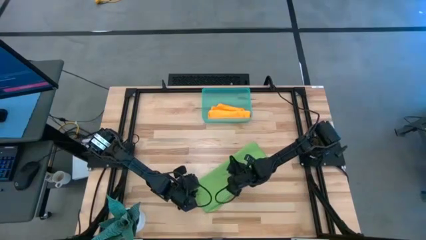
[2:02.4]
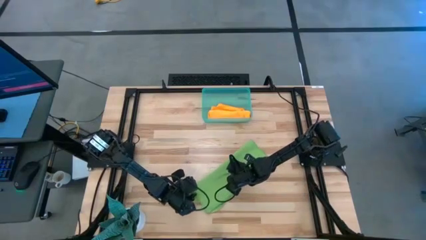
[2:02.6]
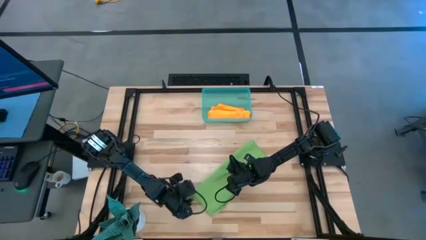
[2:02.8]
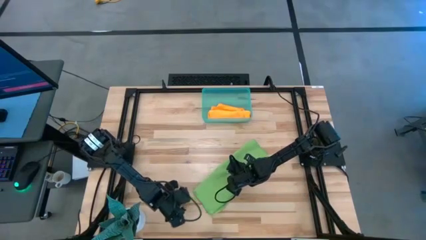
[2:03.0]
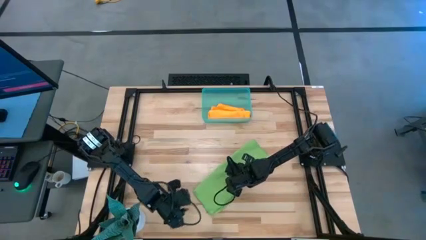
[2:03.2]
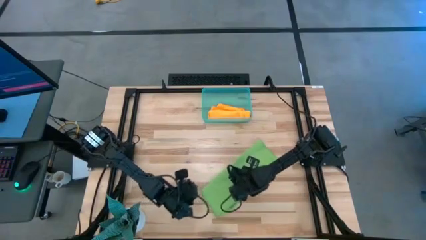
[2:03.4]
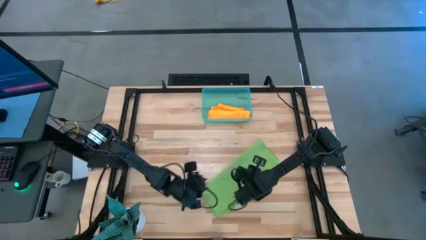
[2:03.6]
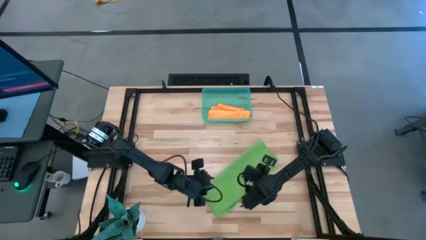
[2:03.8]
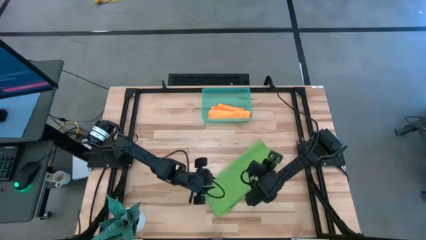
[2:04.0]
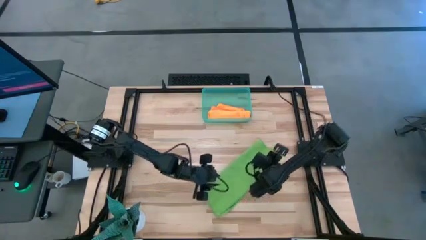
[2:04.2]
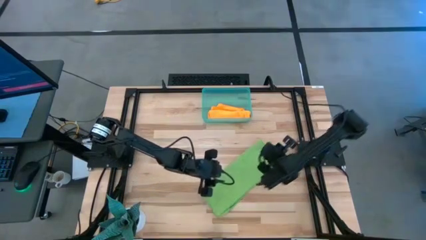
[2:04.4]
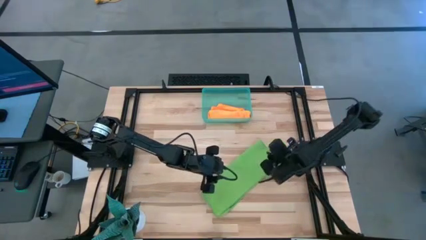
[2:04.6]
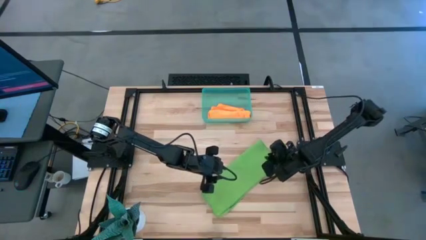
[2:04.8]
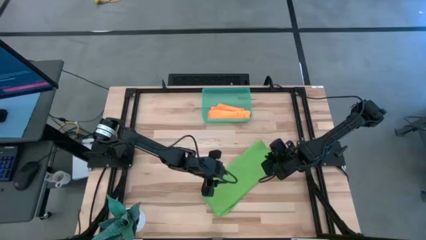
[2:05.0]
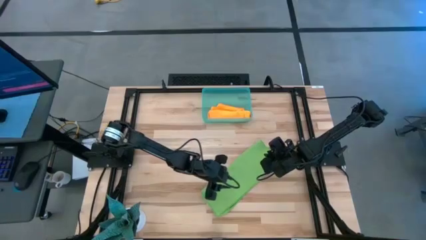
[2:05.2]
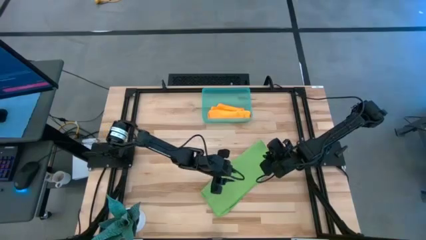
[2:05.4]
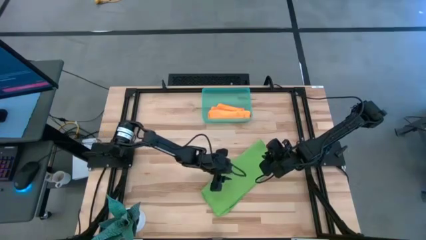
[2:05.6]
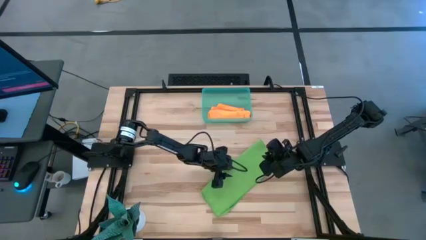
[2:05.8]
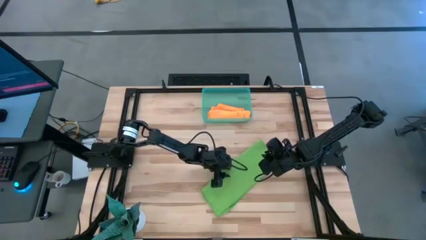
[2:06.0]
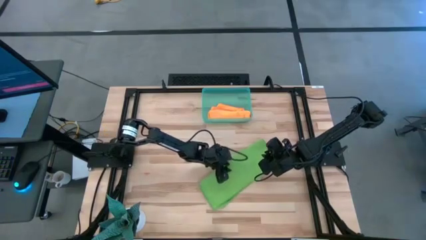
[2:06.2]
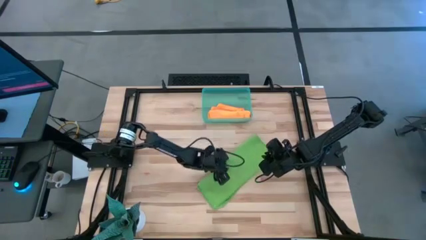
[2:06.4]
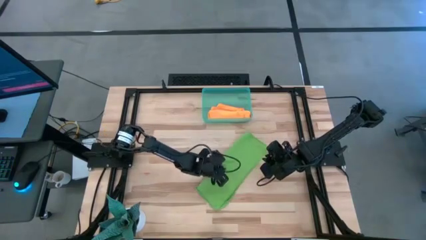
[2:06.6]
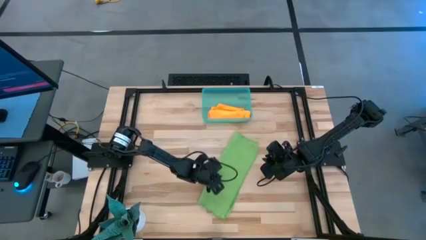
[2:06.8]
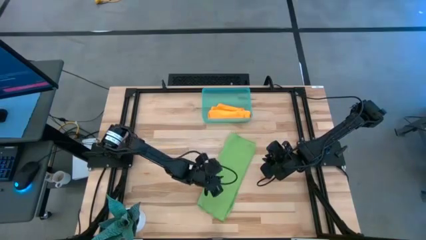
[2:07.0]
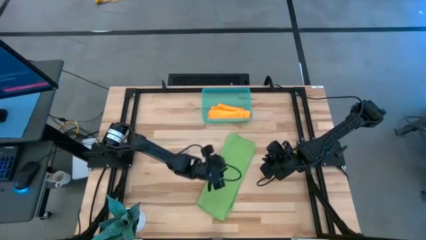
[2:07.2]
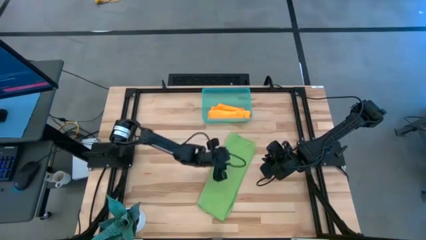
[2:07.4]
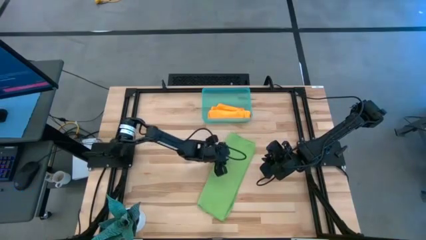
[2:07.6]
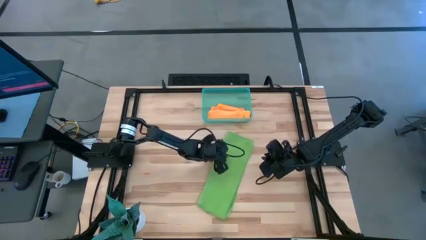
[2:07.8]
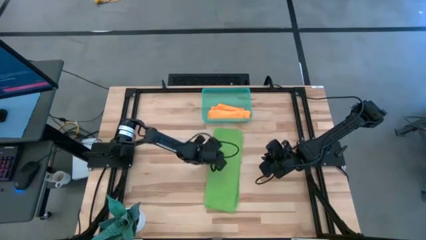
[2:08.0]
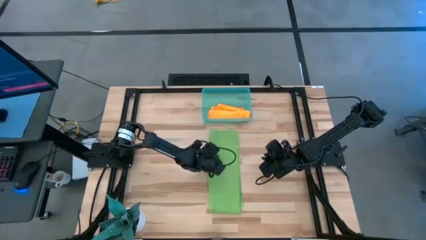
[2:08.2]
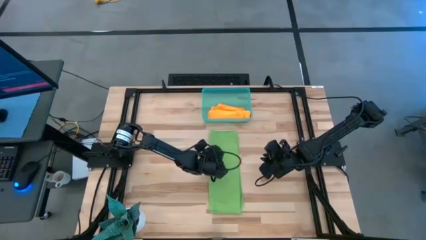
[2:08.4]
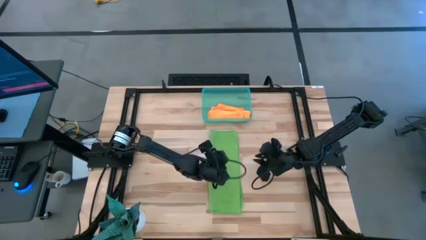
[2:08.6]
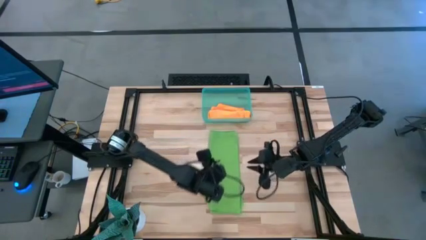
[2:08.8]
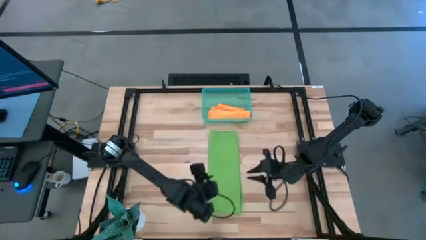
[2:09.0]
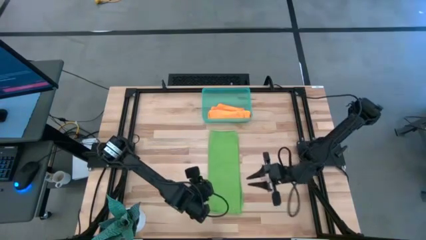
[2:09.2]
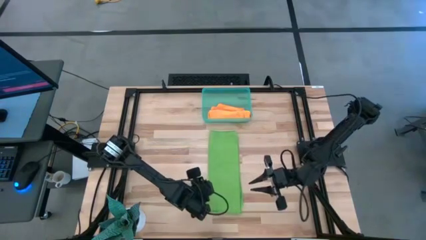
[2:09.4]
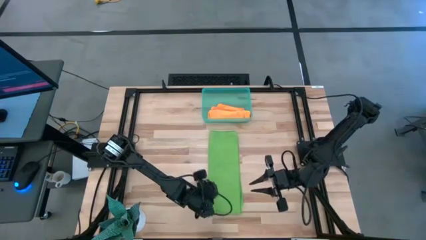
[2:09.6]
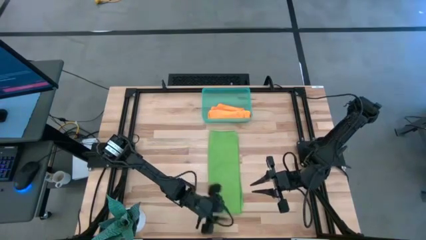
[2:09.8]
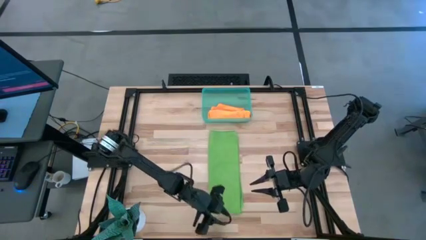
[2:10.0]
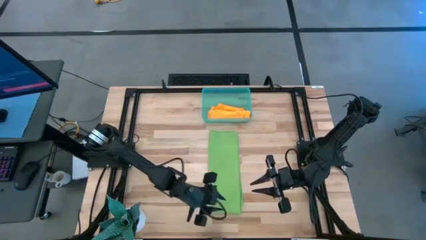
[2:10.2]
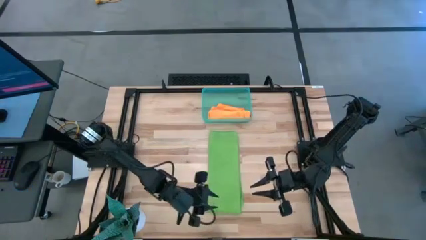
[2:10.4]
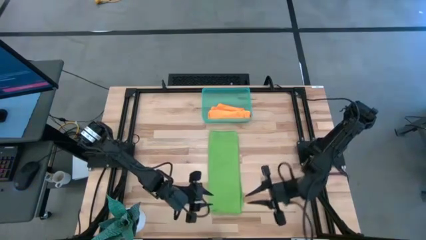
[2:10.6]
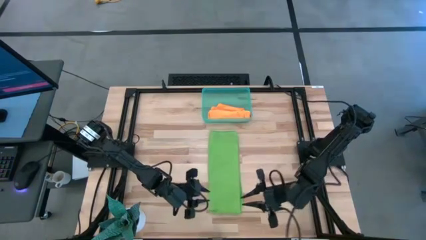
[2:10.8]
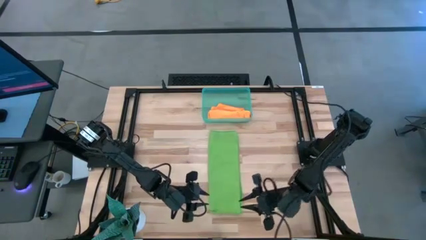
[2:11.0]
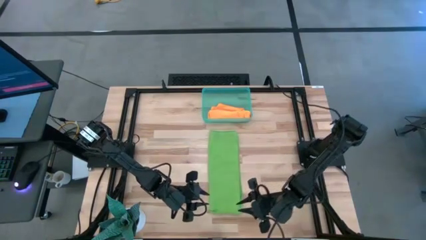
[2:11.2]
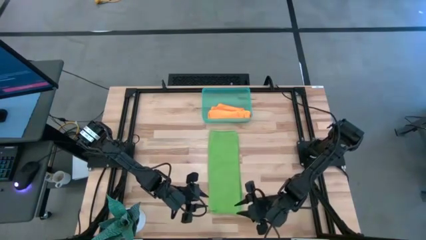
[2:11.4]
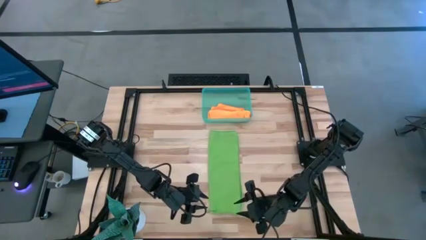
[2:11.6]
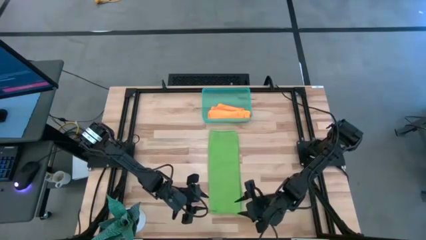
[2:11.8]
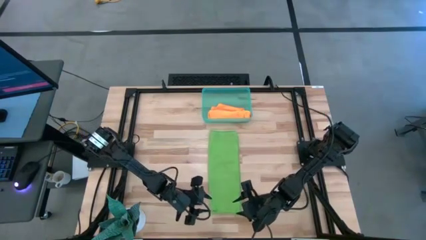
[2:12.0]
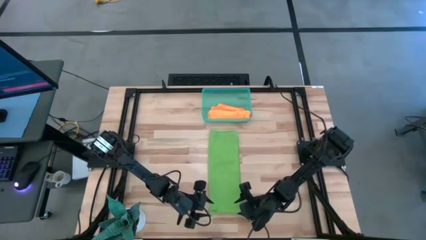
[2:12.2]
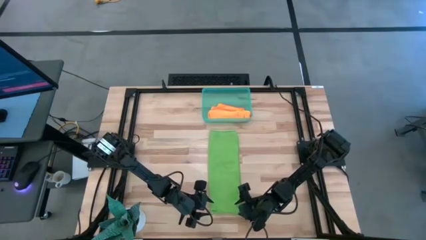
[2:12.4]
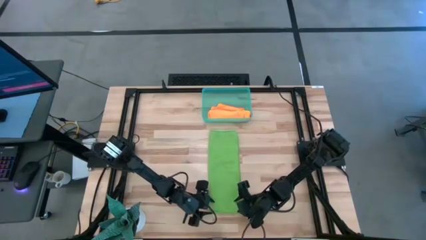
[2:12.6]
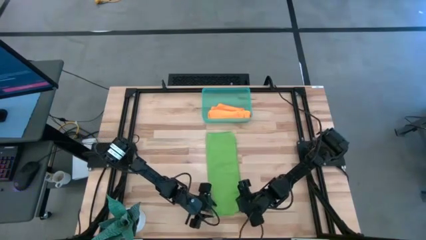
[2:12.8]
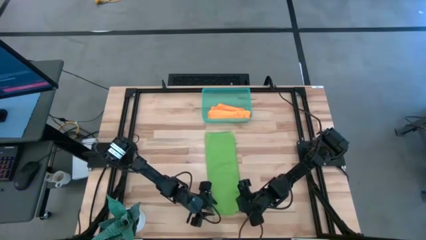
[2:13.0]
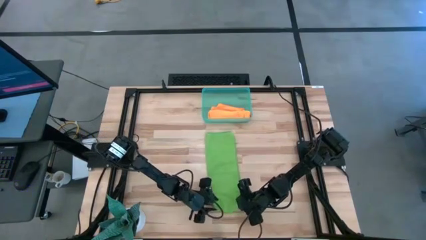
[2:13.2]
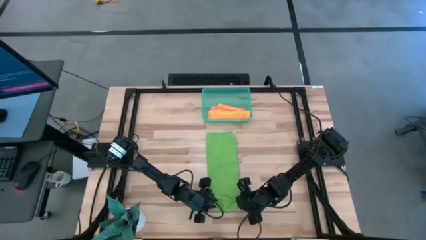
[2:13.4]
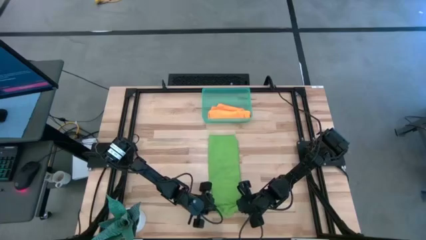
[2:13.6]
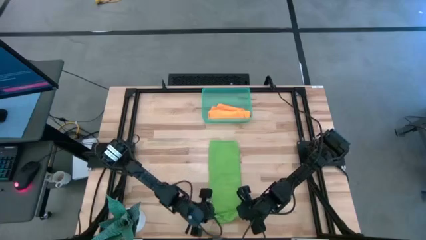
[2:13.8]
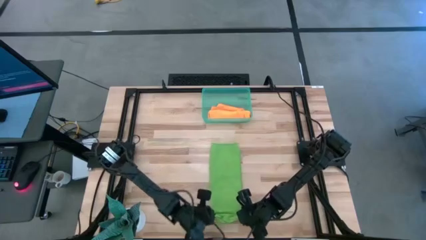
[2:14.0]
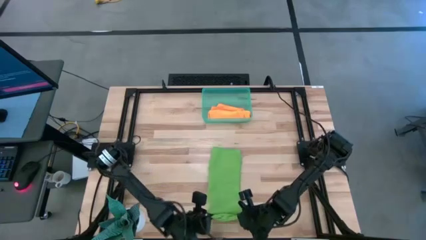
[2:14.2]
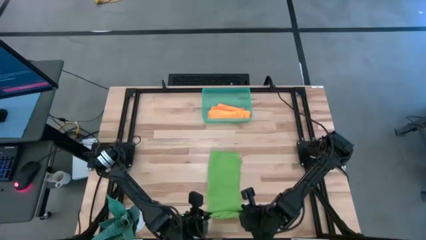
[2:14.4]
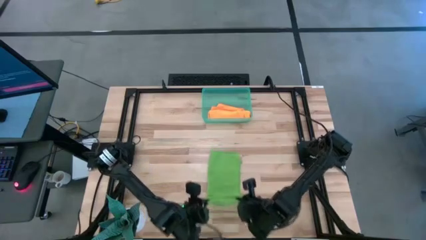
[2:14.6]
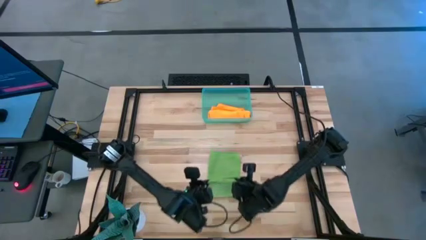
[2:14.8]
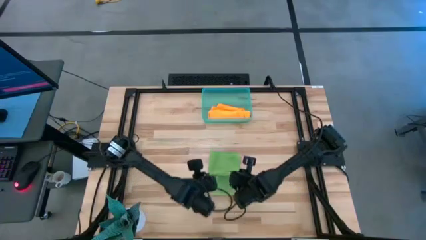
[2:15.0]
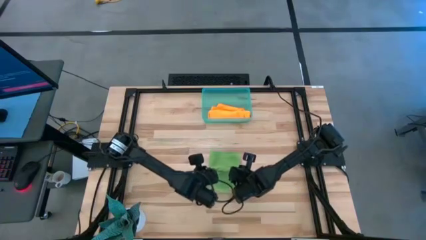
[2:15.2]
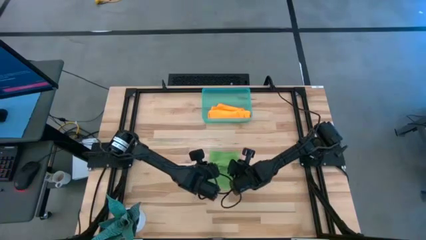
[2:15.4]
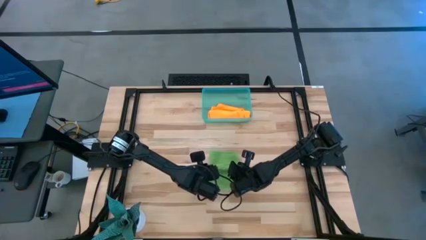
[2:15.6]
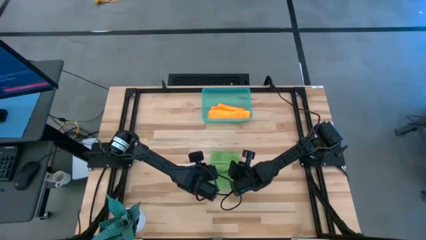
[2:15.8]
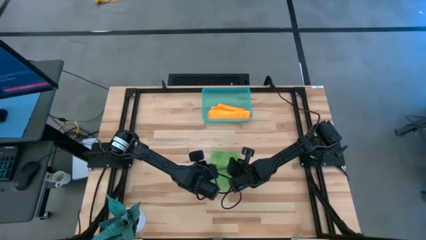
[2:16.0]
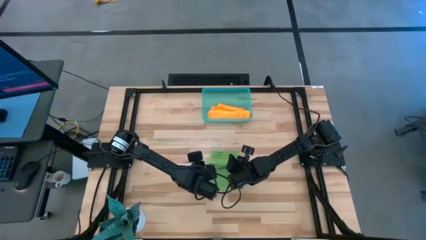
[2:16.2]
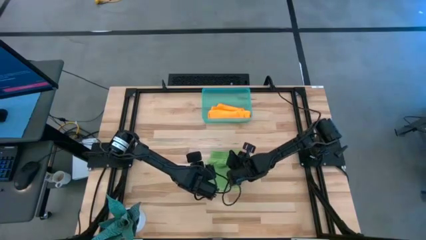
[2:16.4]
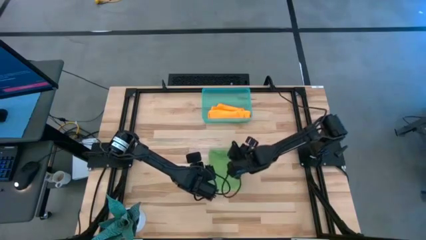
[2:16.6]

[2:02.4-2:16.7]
Task: Roll microfiber towels into tight, uniform cylinder then place into a basket
Fold the green microfiber towel
